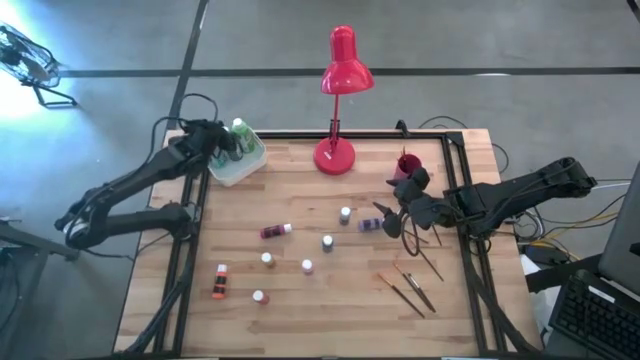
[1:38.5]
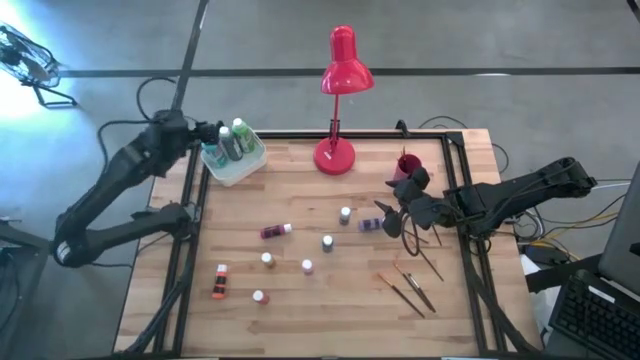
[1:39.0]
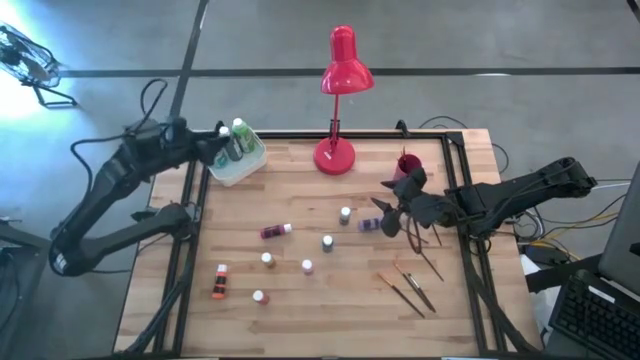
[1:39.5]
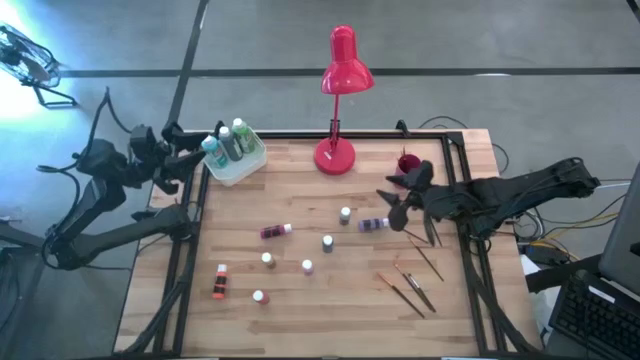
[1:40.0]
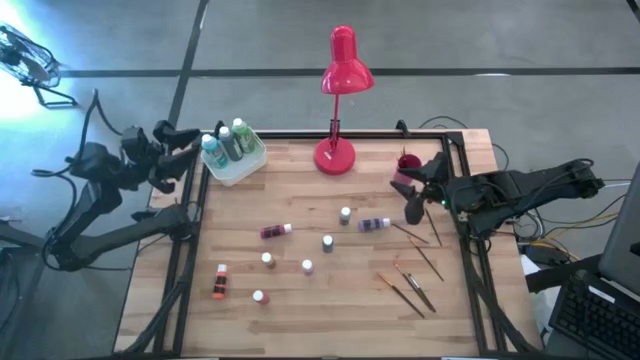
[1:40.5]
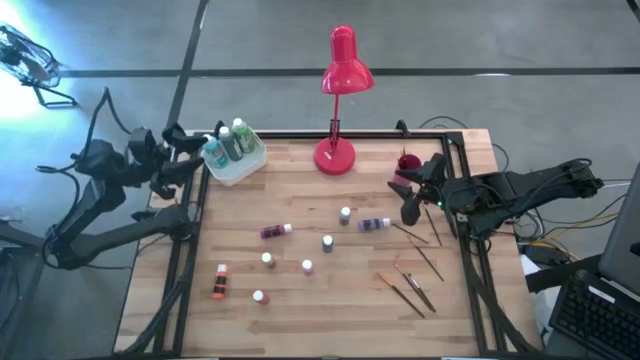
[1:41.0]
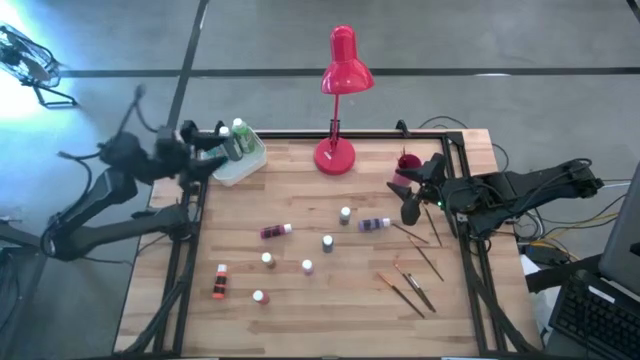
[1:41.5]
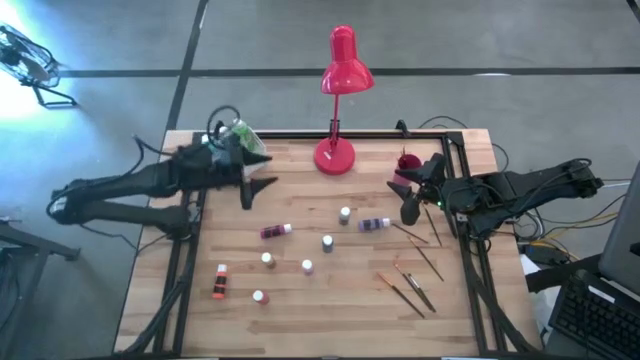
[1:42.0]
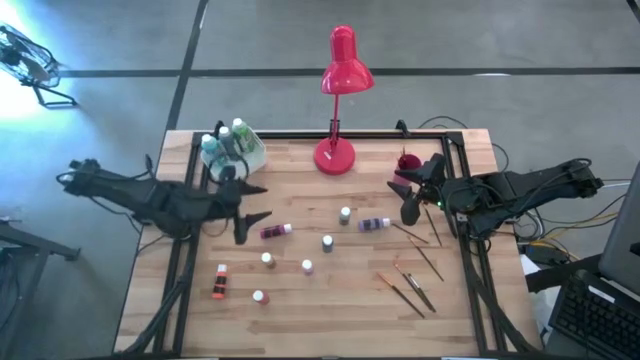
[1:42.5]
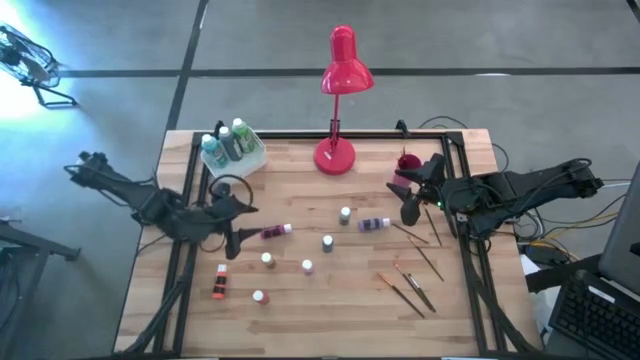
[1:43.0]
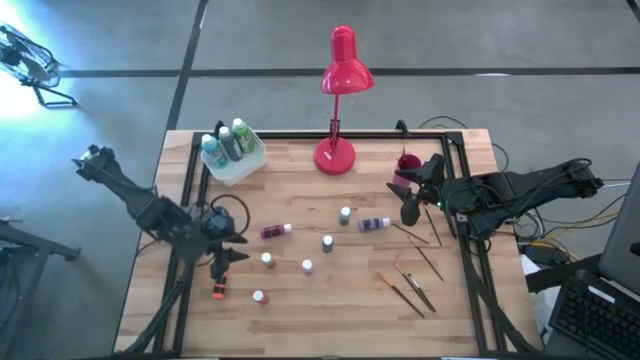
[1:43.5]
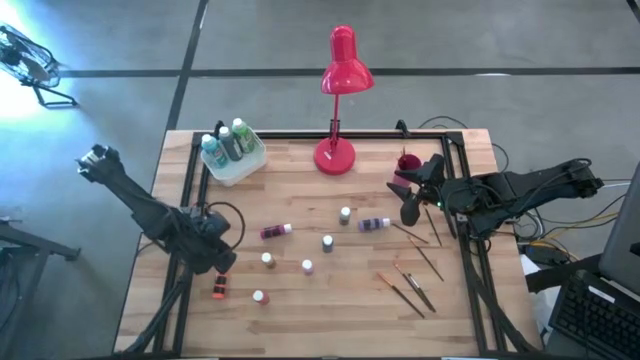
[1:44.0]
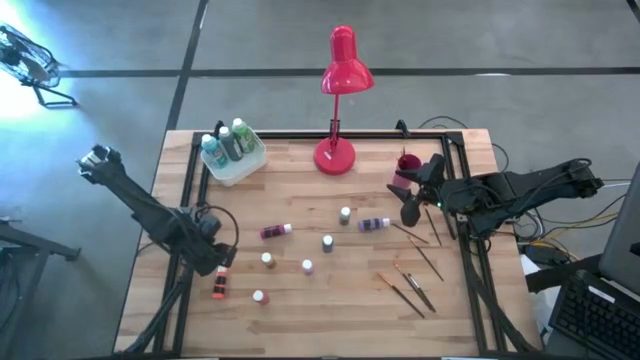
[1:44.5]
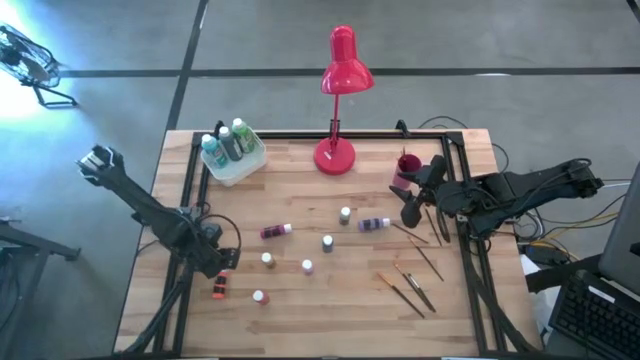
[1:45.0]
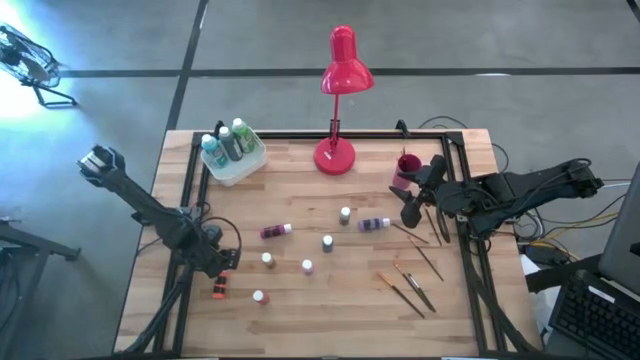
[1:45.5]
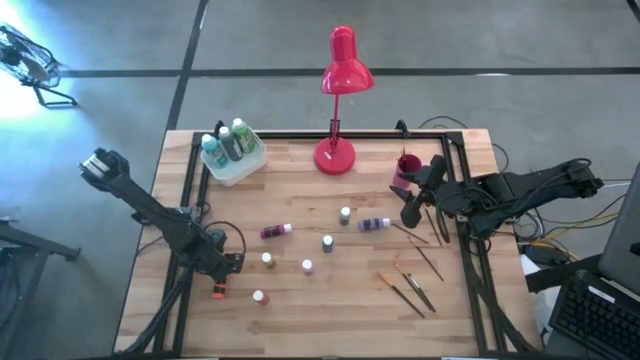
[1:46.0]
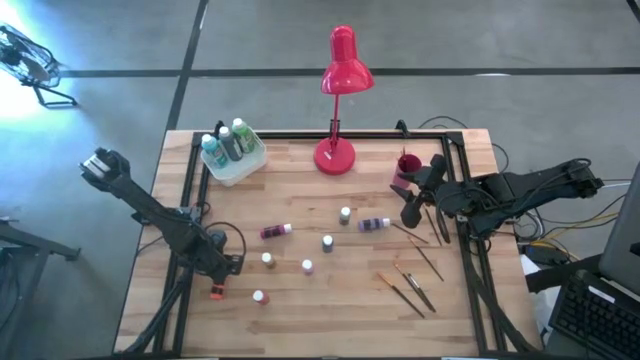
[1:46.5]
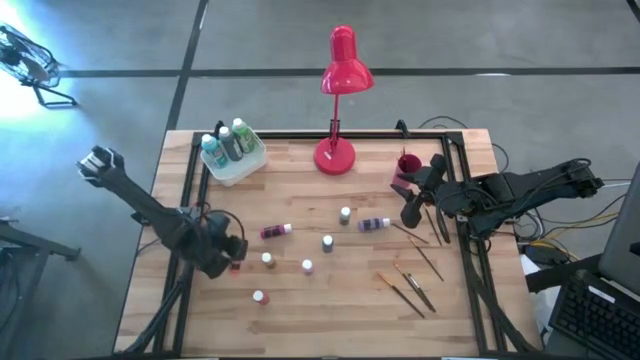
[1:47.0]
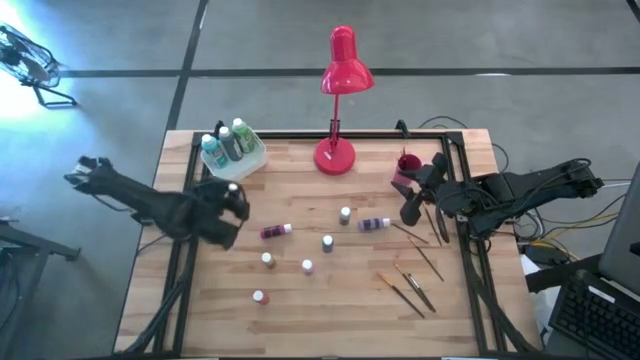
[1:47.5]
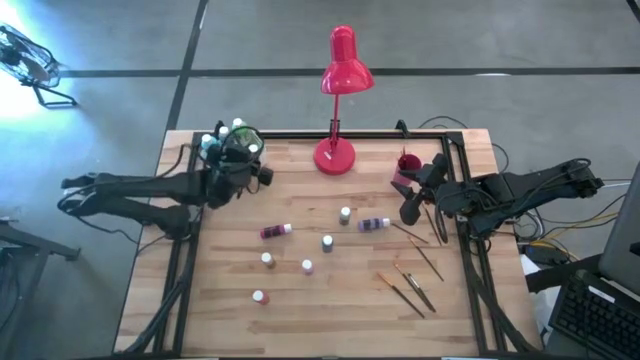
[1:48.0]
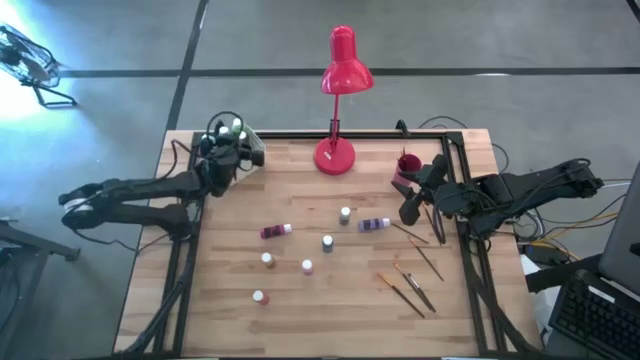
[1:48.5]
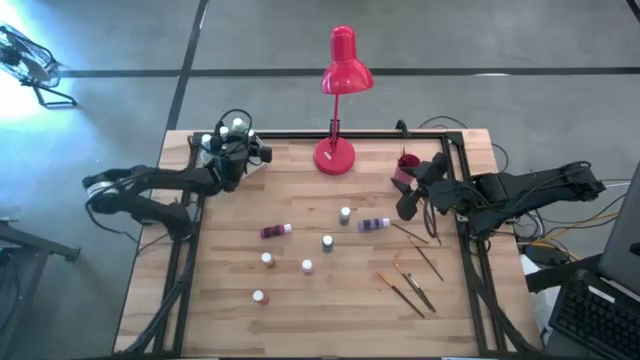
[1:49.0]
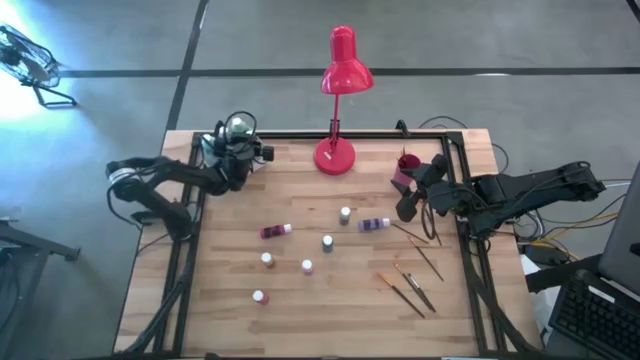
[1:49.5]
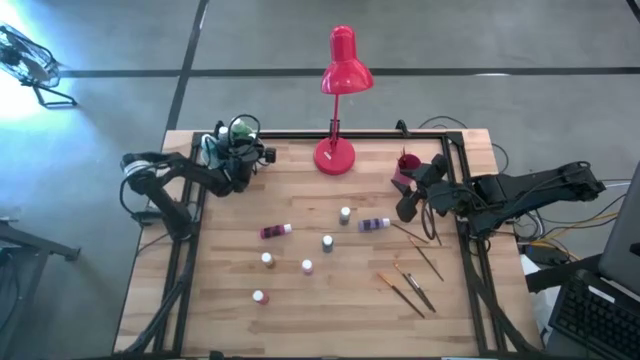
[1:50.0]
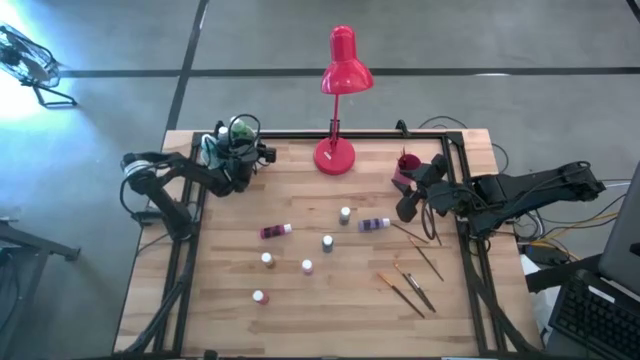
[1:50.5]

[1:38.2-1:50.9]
Task: Pick & Place Paint Supplies
Put the orange paint bottle into the white bin

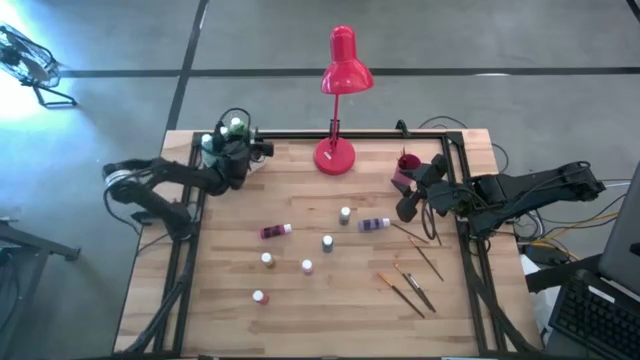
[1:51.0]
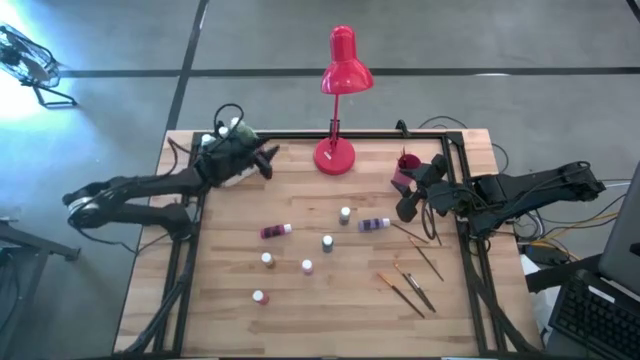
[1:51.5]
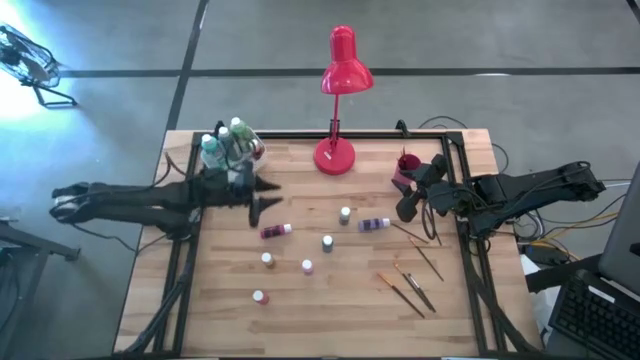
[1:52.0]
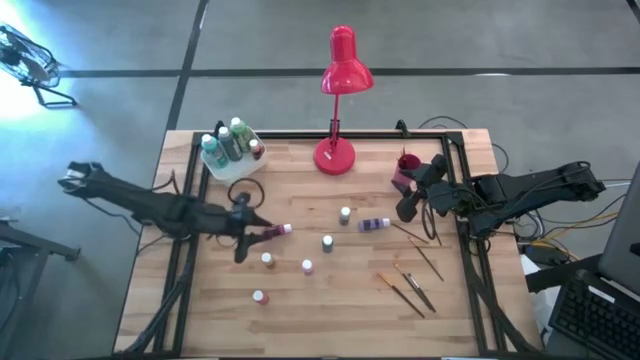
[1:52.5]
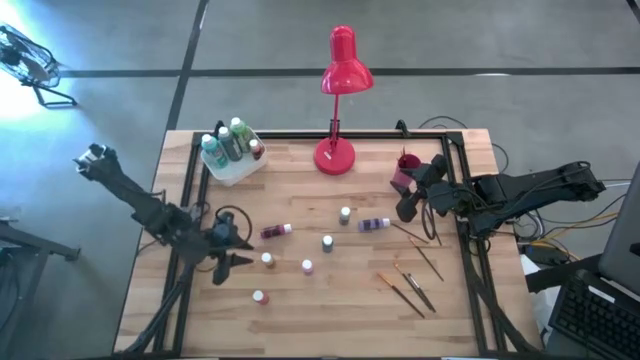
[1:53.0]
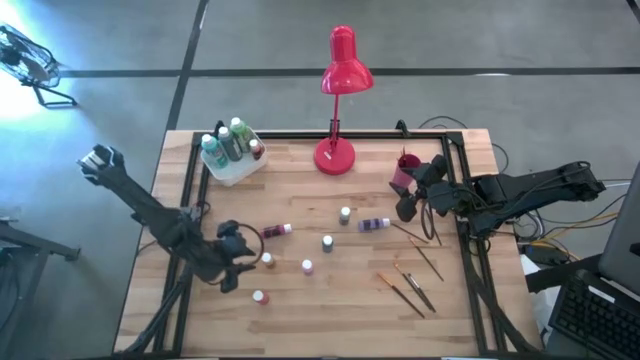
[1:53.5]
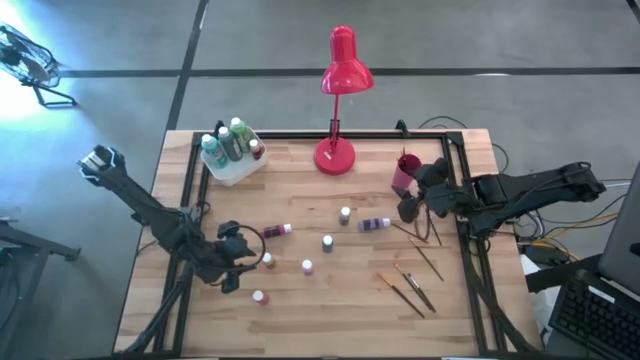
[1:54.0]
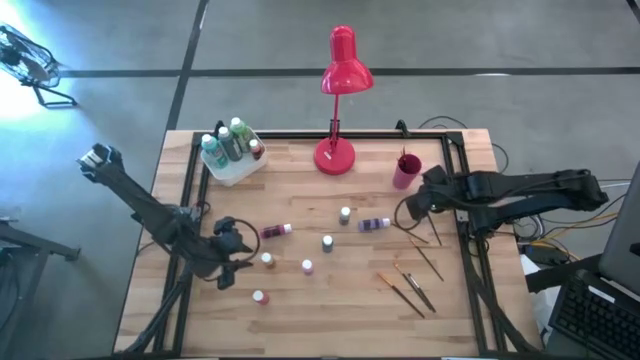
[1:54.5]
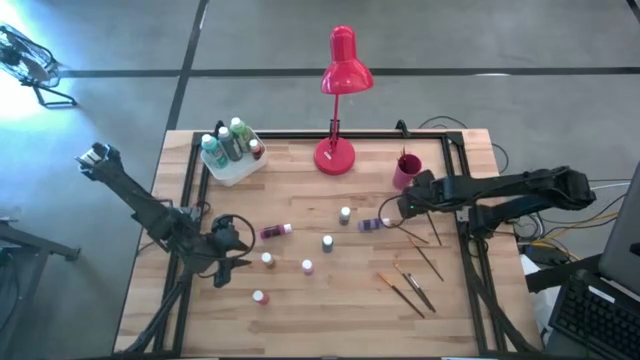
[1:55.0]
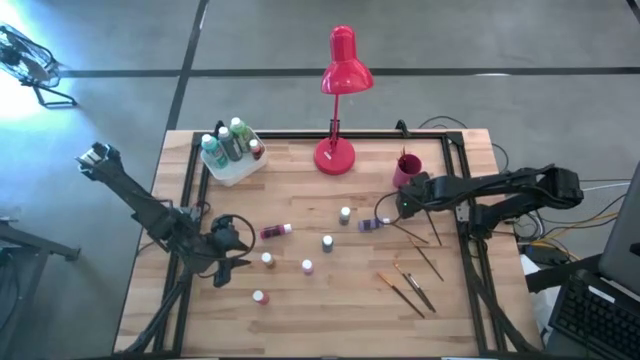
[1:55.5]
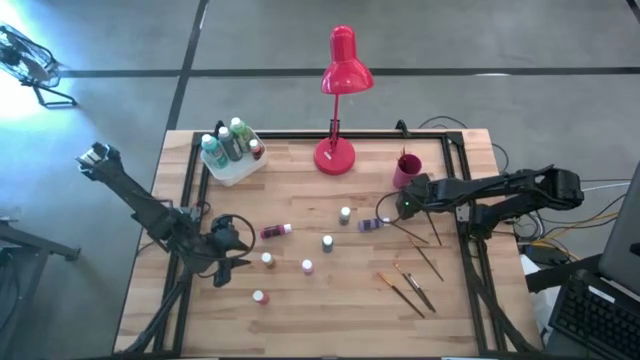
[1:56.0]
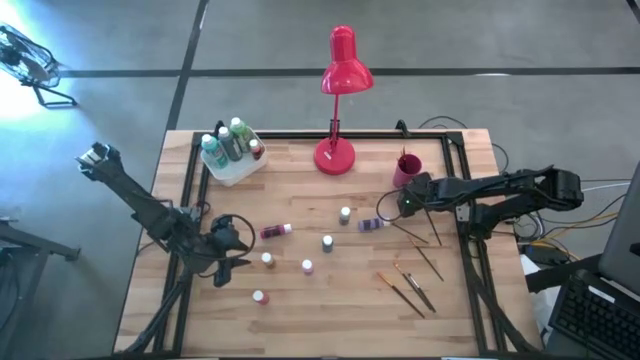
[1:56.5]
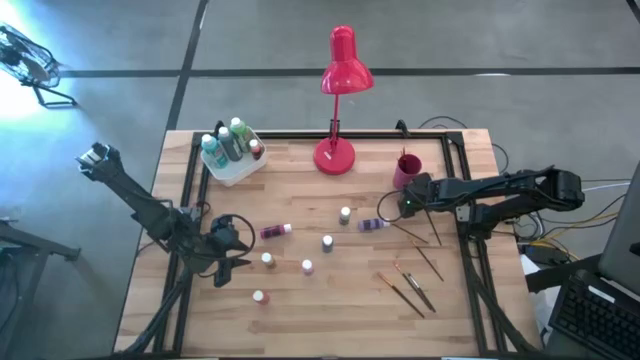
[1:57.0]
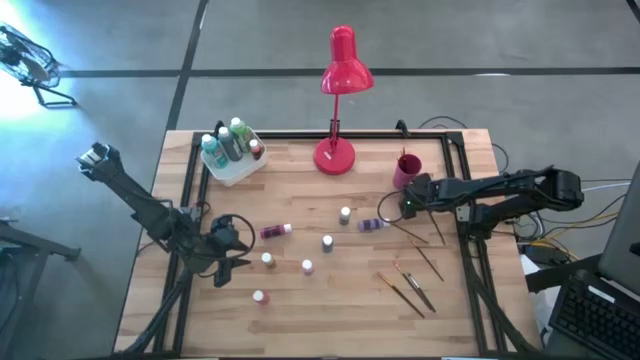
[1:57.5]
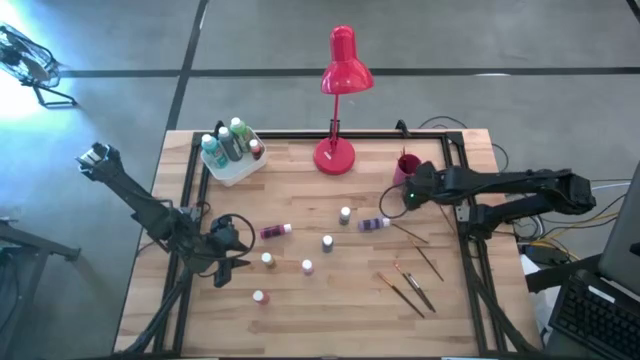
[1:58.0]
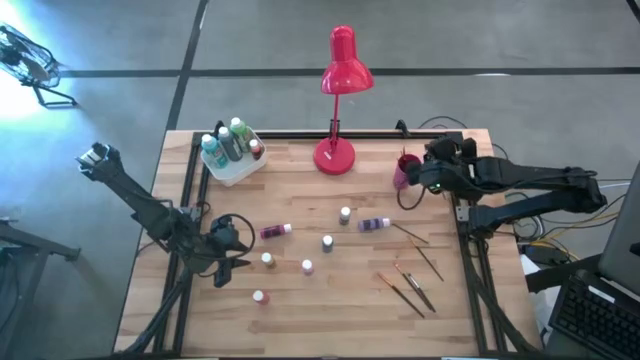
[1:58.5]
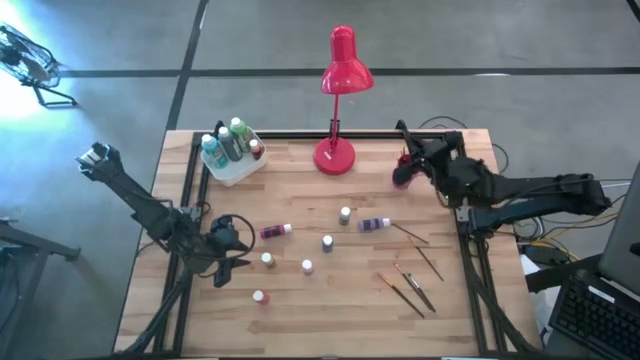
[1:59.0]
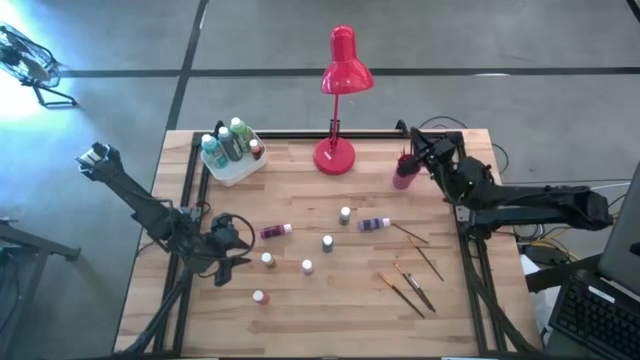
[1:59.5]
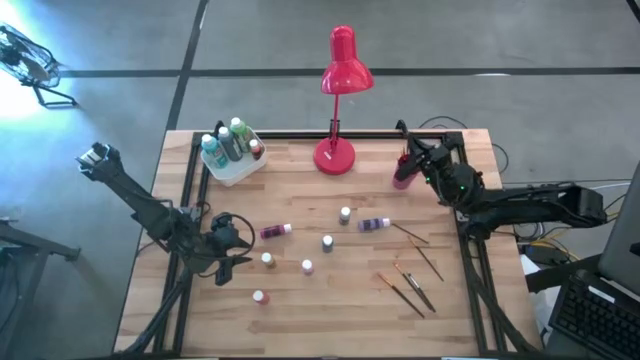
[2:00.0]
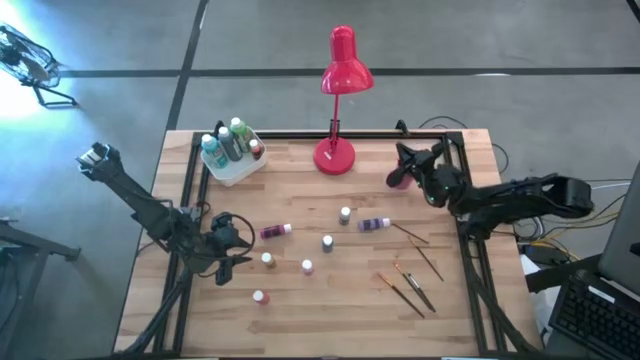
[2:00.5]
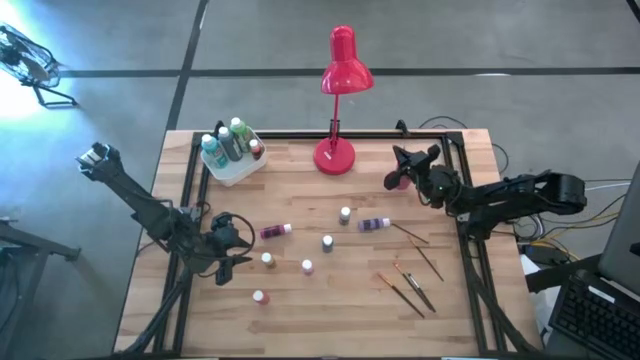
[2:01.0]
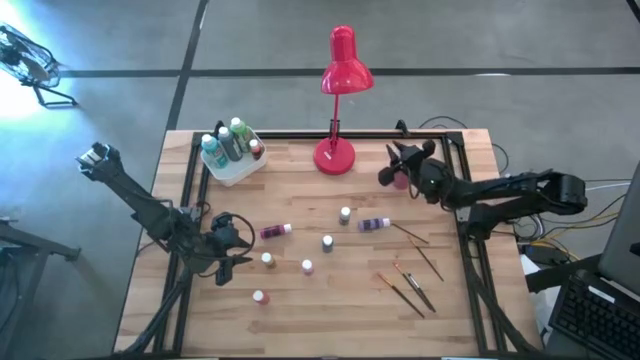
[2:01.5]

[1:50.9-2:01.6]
Put the gold paintbrush into the pink cup
